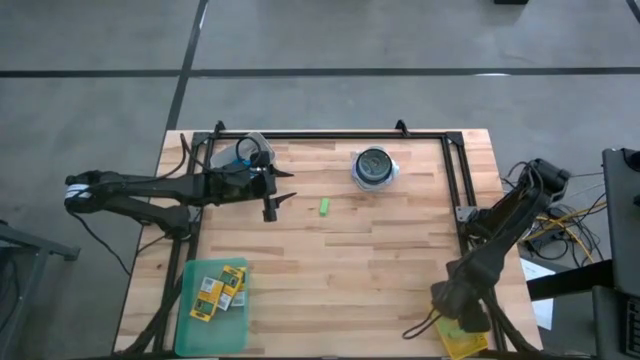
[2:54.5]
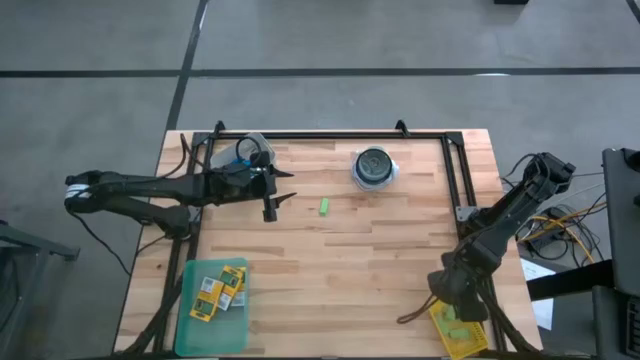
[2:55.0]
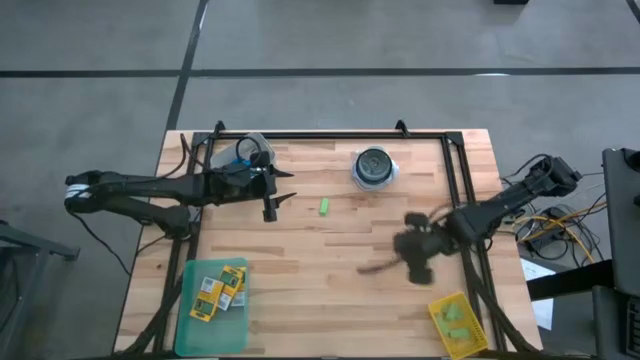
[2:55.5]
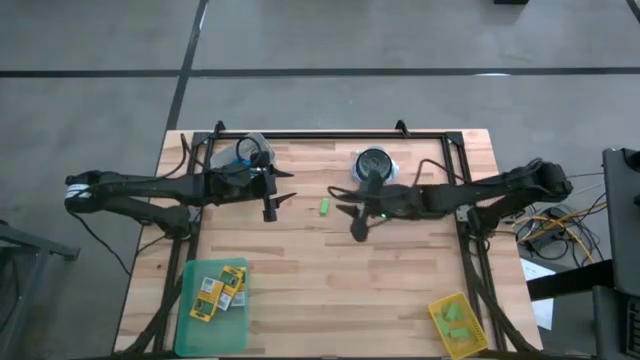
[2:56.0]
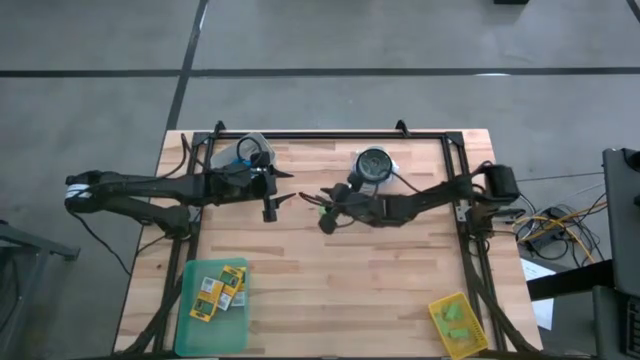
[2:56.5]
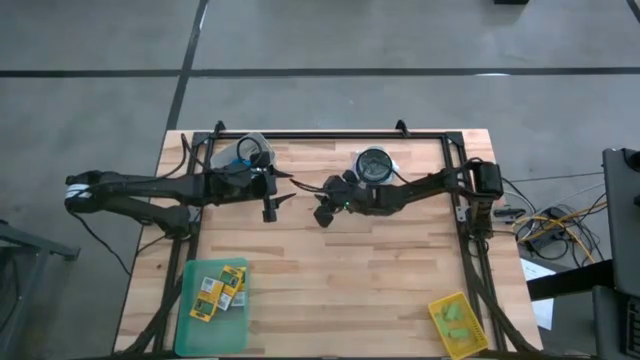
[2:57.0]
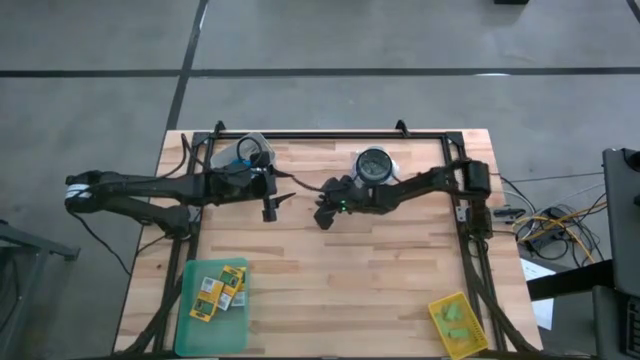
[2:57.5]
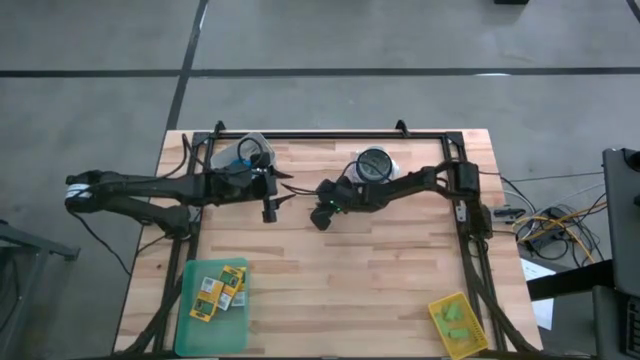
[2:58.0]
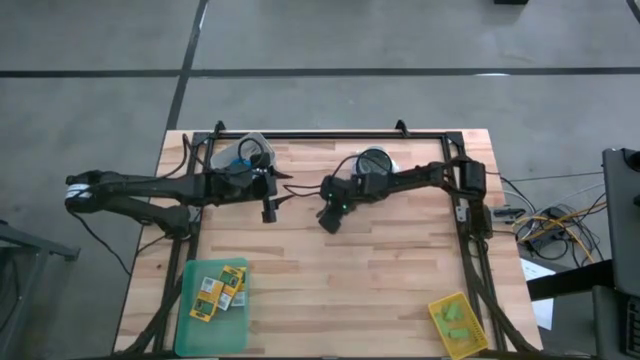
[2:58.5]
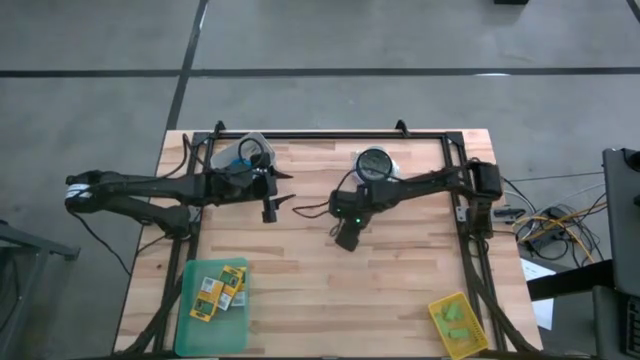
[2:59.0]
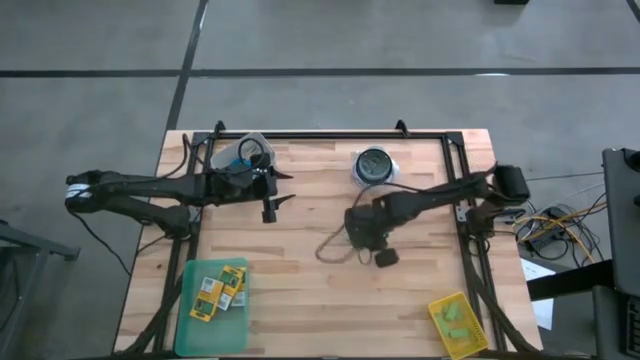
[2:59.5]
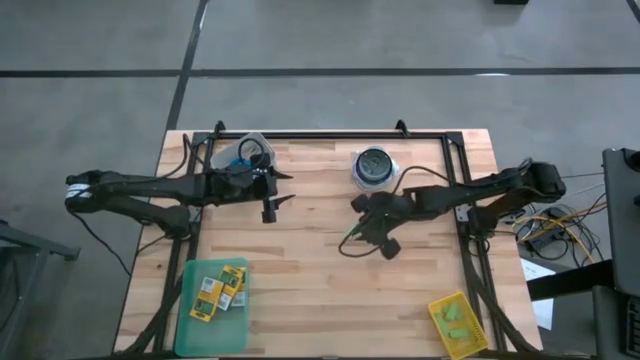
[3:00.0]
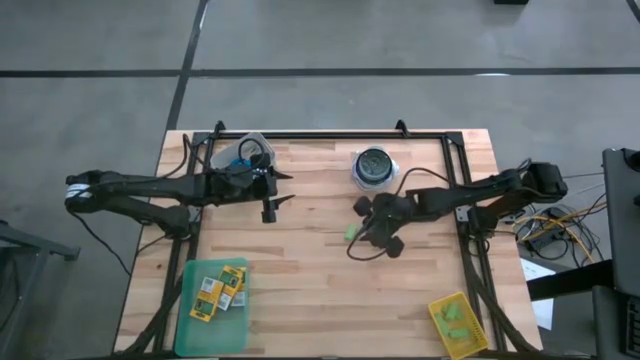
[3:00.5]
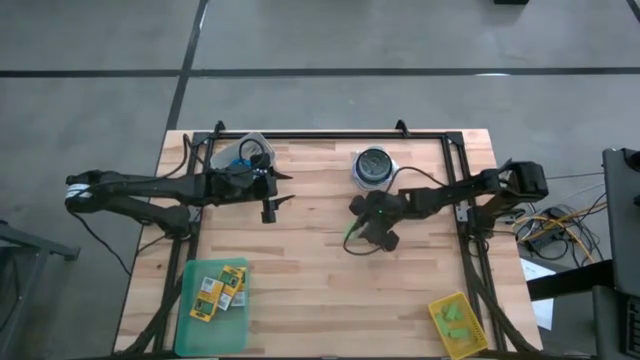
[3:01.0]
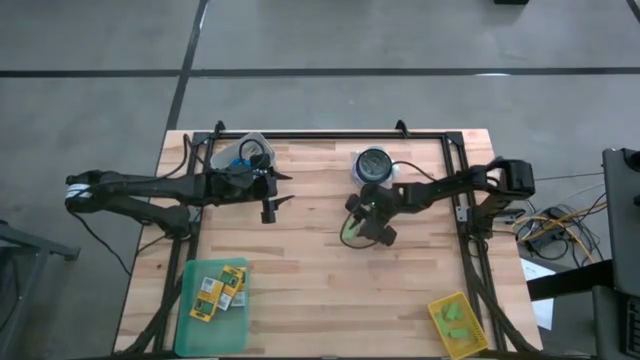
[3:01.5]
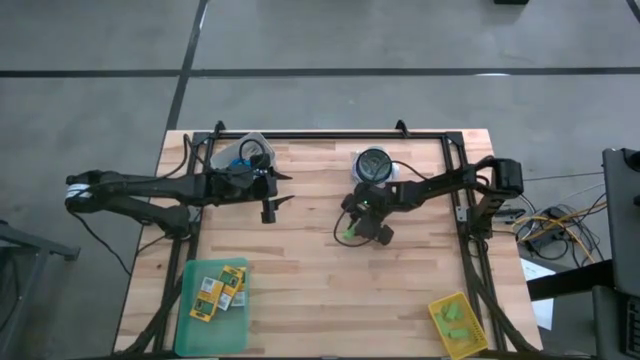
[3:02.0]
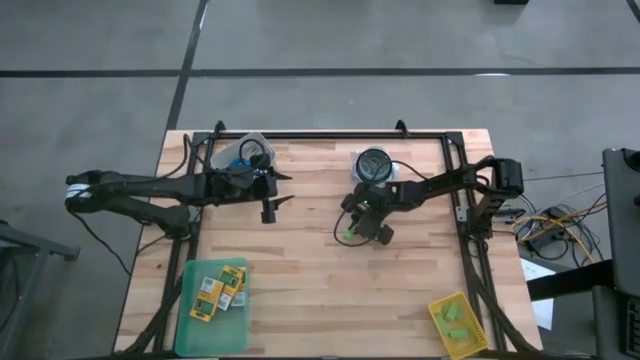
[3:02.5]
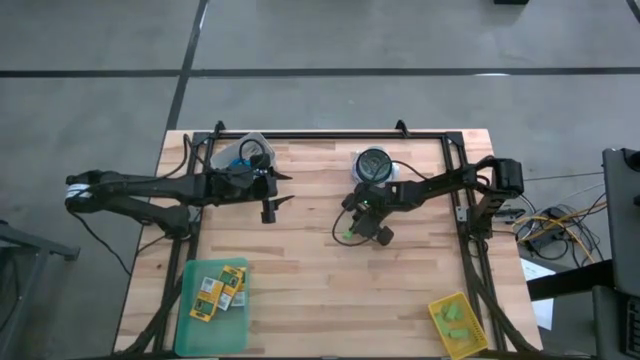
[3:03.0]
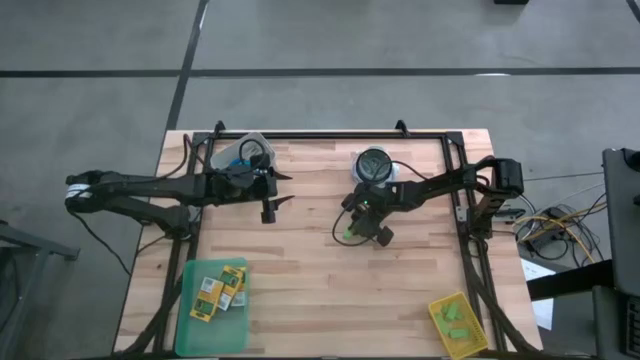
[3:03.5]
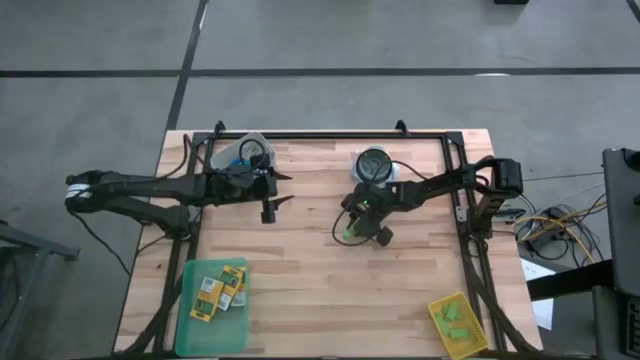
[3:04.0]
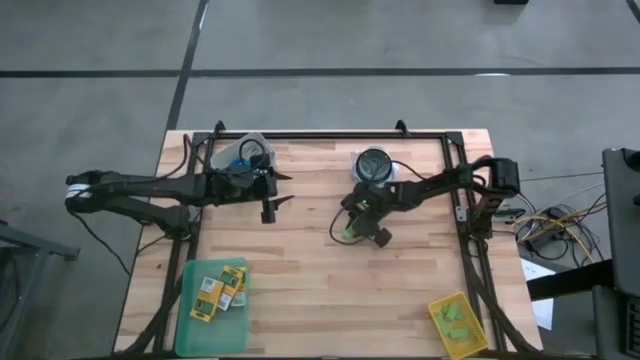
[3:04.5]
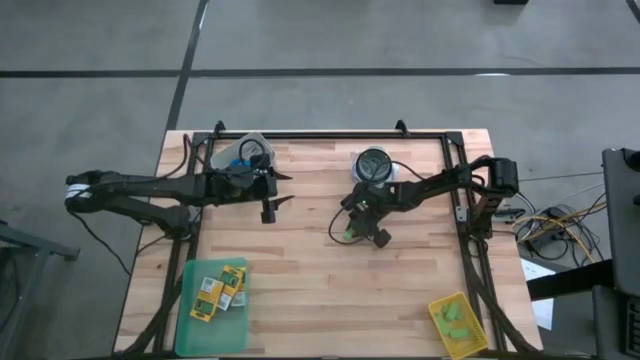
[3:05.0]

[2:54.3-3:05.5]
Task: Pick & Place School Supplies
Put the green eraser into the yellow bin

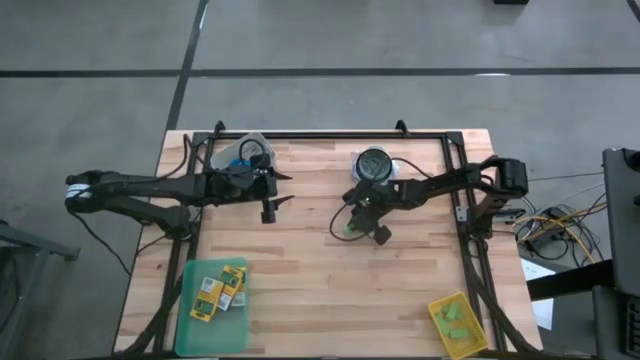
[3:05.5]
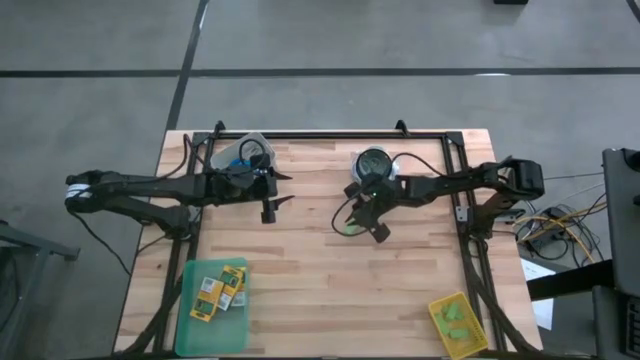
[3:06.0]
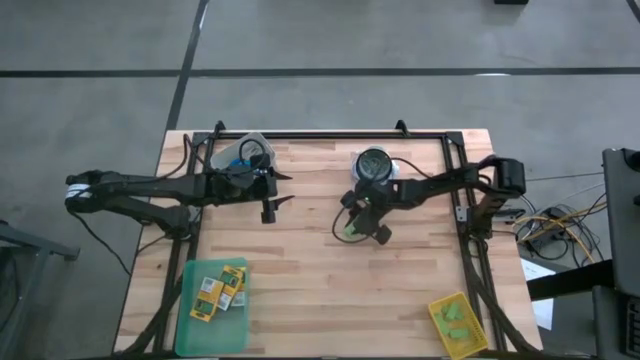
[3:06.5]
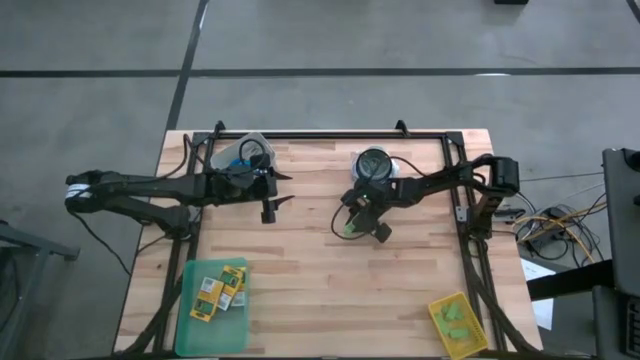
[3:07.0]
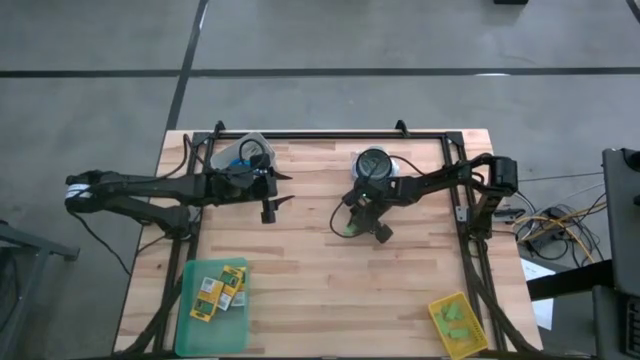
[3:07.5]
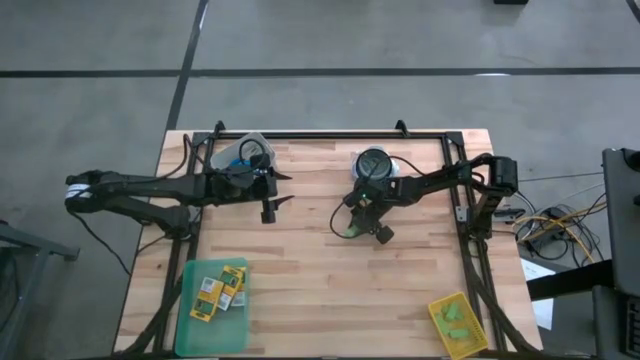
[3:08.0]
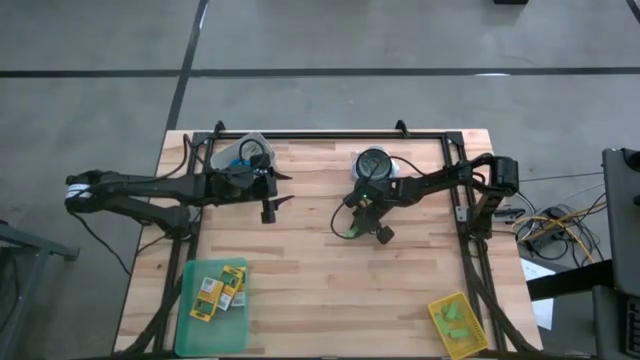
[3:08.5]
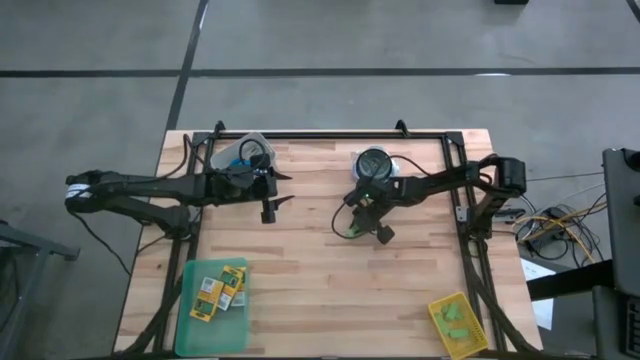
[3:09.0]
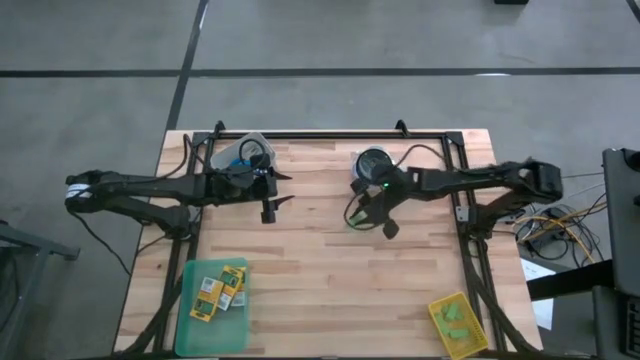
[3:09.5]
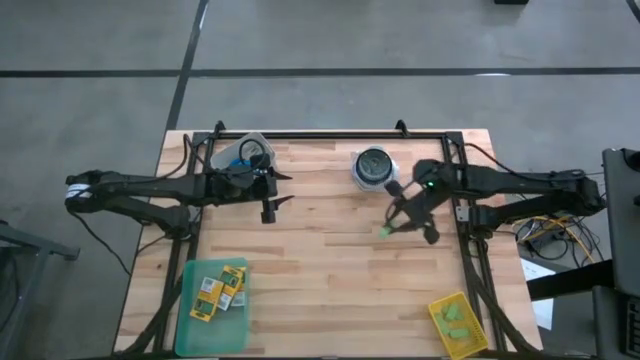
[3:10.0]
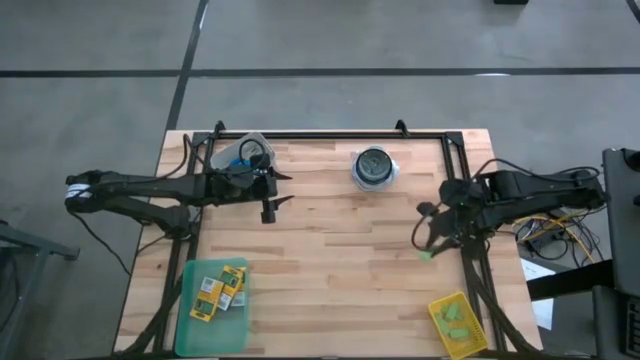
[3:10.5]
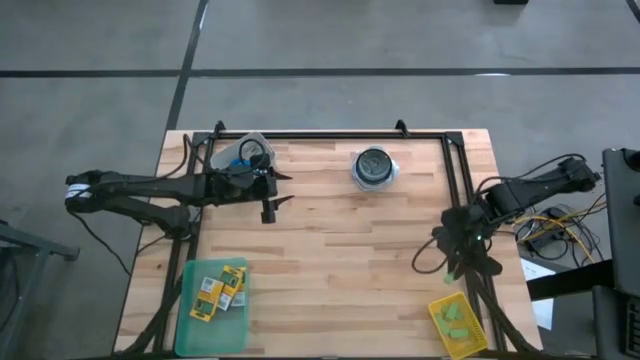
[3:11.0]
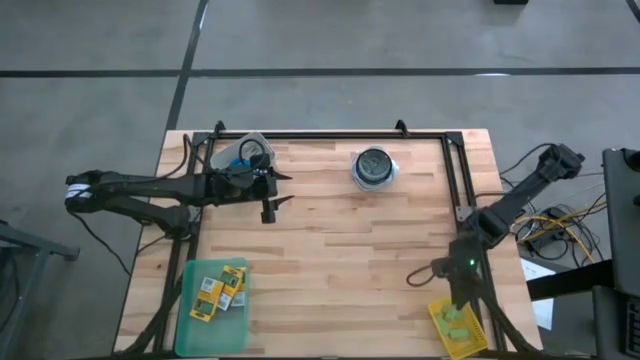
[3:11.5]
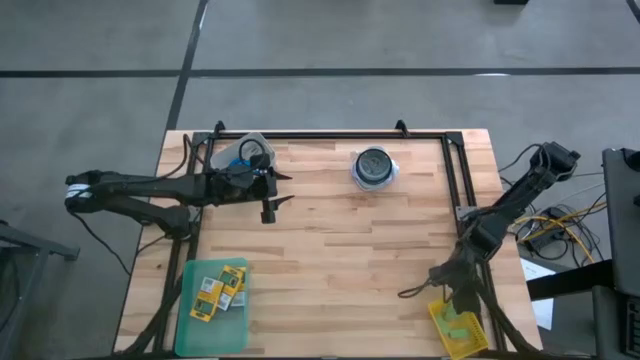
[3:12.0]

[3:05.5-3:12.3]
Put the green eraser into the yellow bin

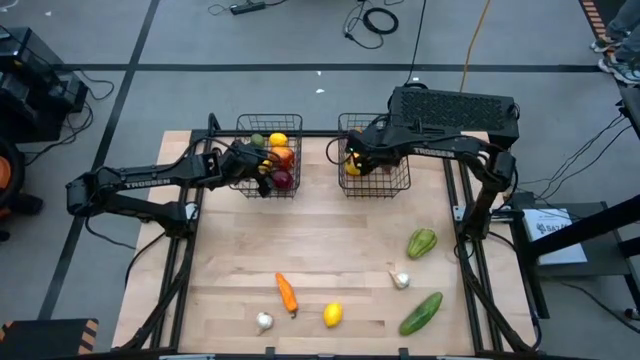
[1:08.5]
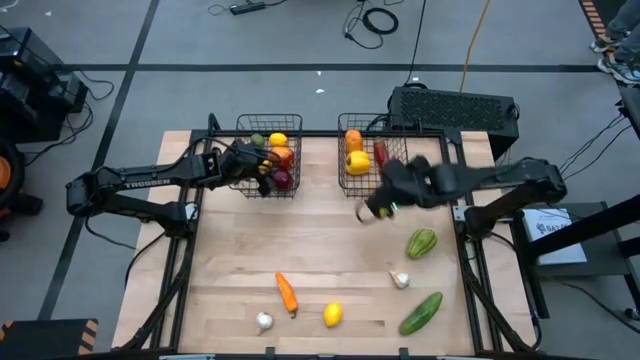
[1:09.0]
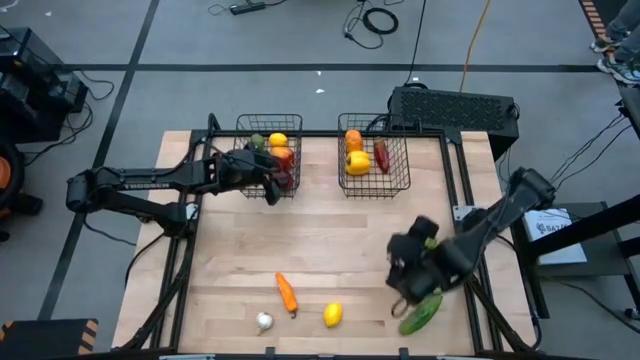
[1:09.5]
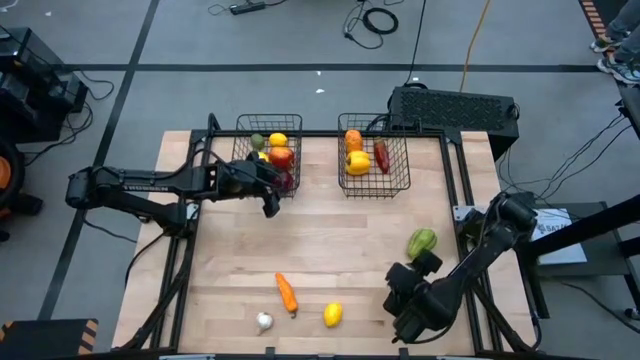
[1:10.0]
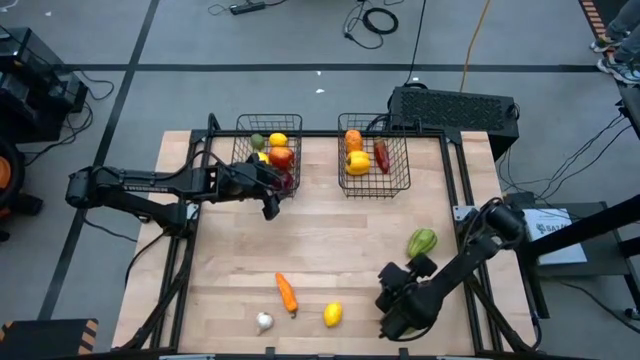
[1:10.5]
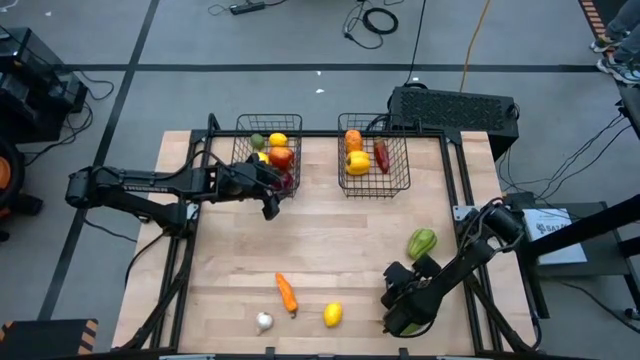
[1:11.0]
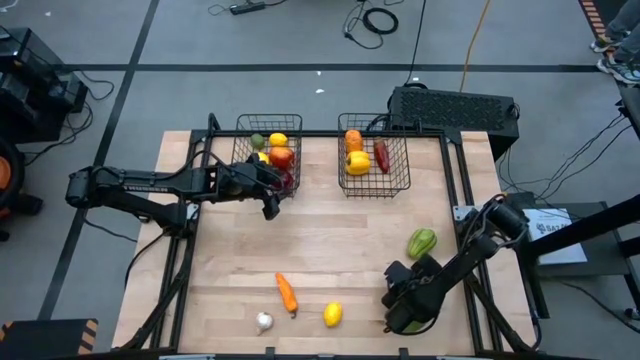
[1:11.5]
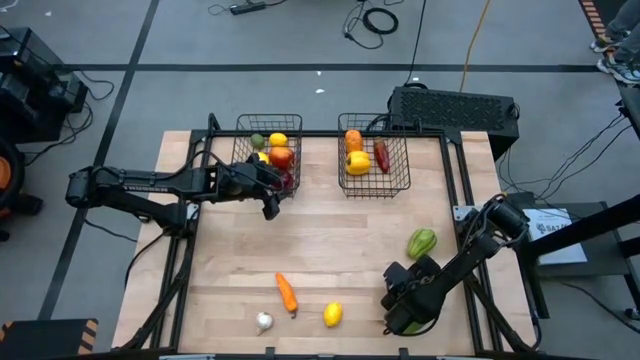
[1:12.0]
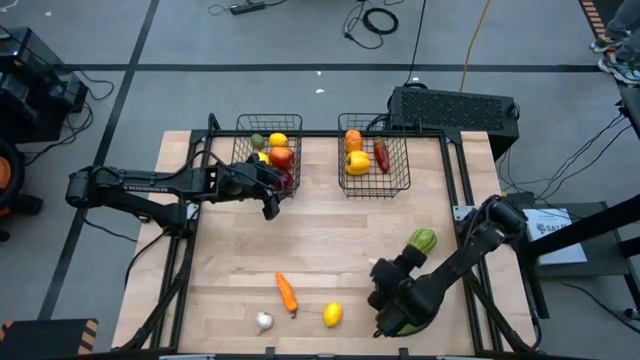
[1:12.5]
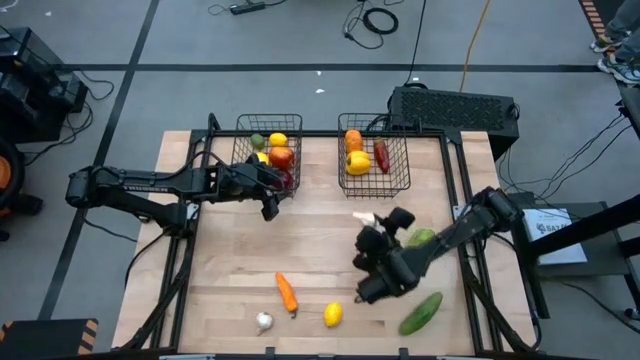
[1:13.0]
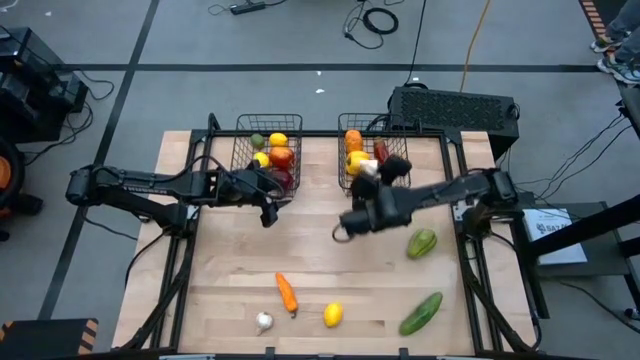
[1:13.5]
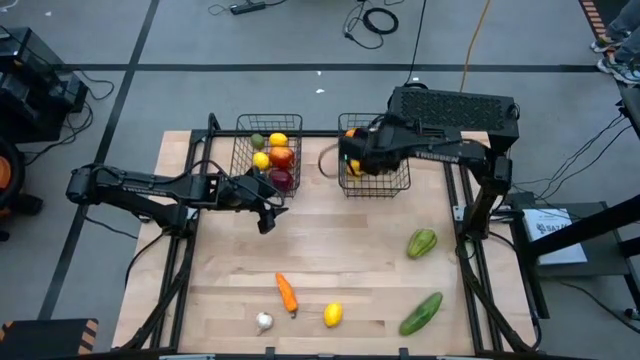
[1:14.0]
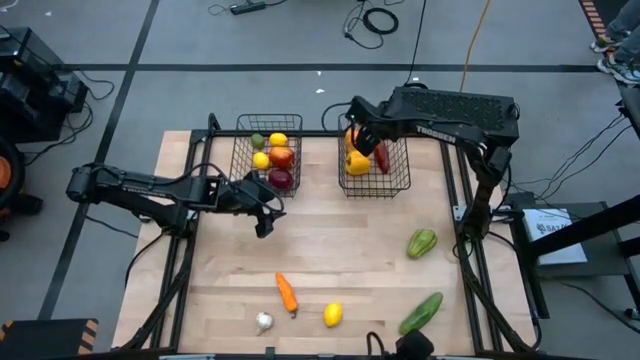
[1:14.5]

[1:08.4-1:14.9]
Task: Sort produce into baskets
Put the right white garlic into the right mesh basket
